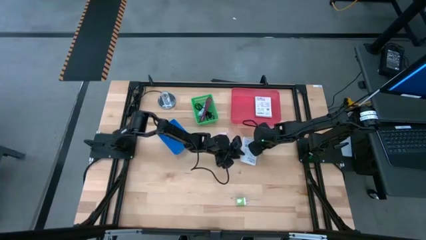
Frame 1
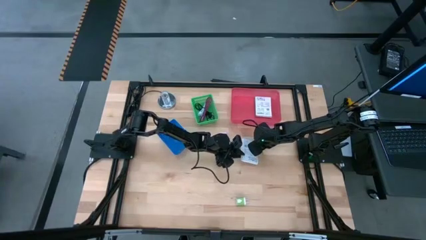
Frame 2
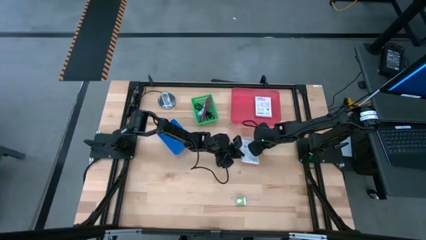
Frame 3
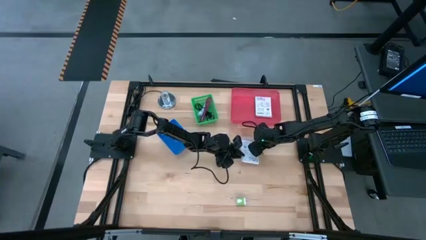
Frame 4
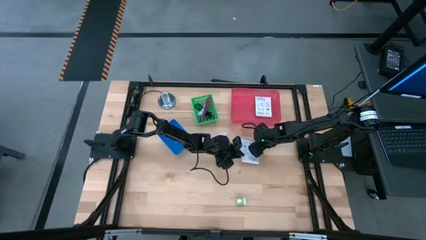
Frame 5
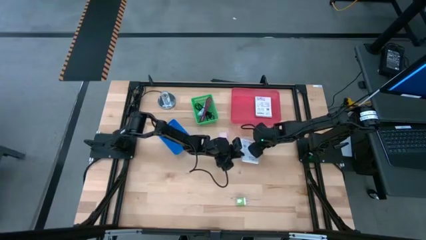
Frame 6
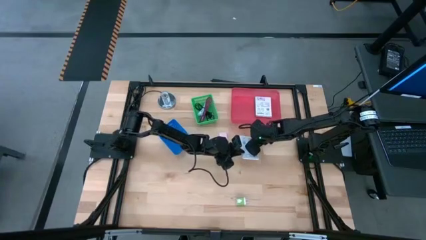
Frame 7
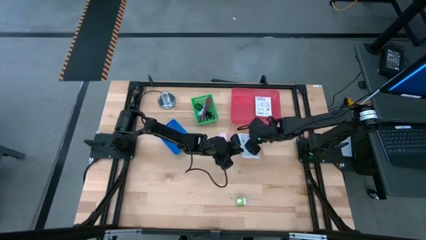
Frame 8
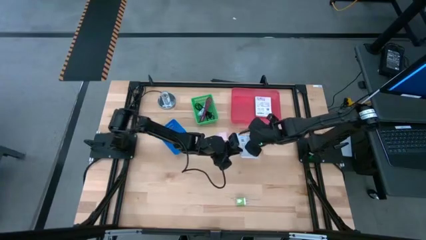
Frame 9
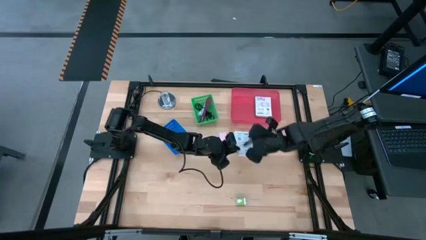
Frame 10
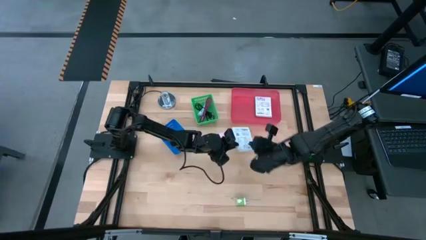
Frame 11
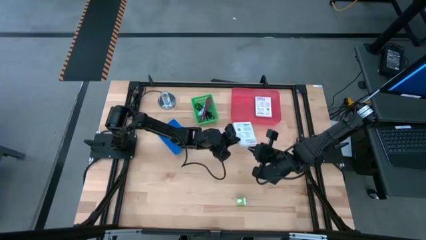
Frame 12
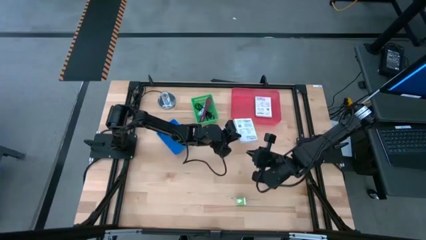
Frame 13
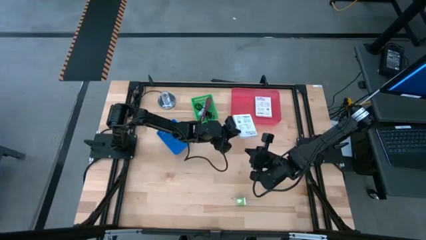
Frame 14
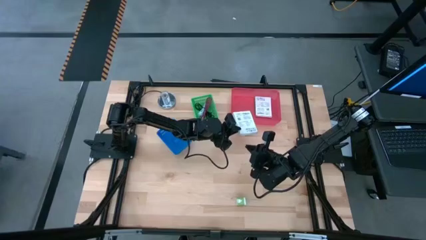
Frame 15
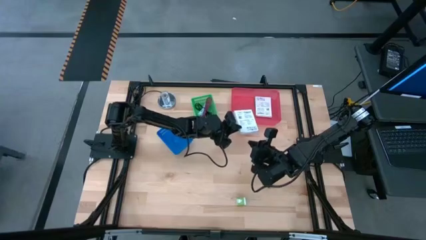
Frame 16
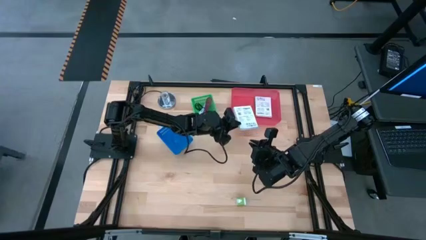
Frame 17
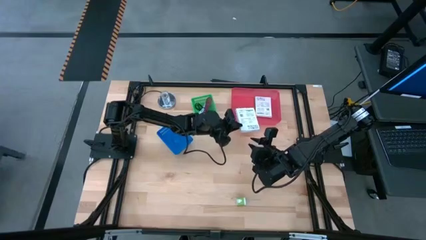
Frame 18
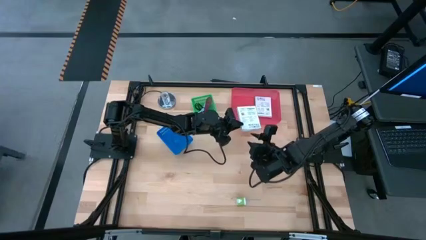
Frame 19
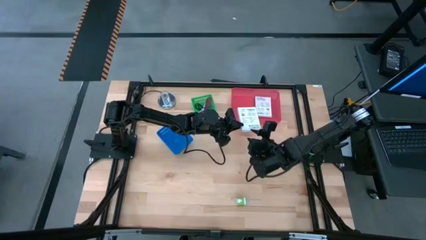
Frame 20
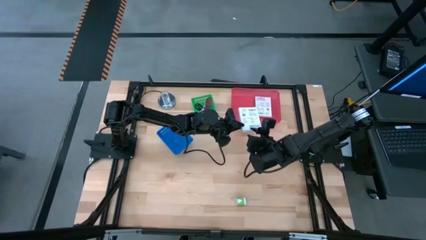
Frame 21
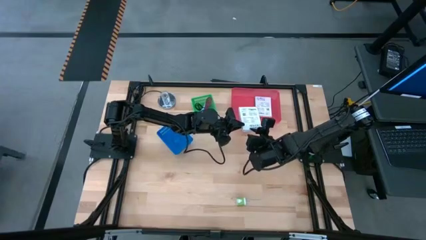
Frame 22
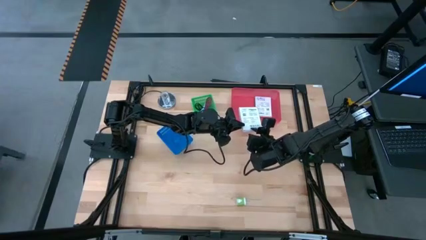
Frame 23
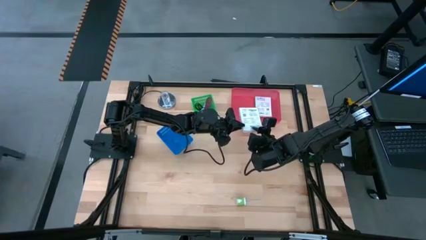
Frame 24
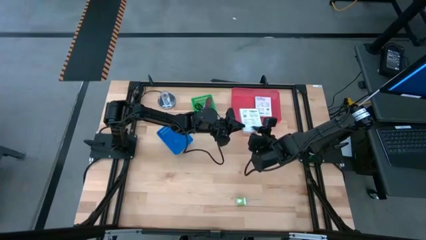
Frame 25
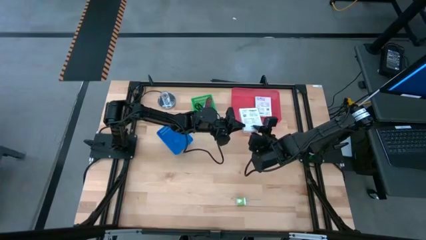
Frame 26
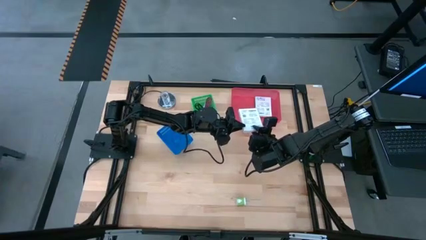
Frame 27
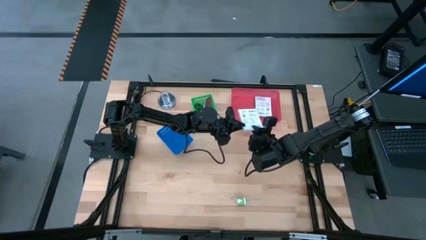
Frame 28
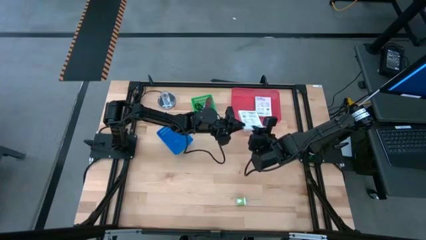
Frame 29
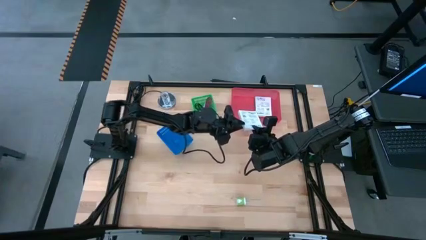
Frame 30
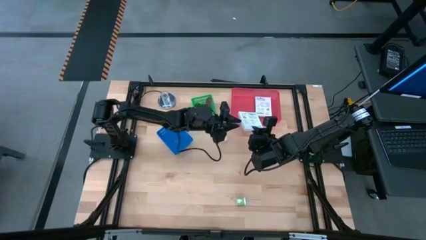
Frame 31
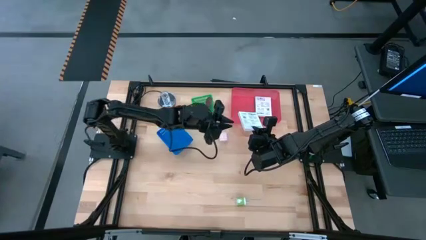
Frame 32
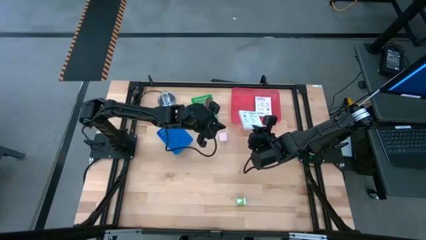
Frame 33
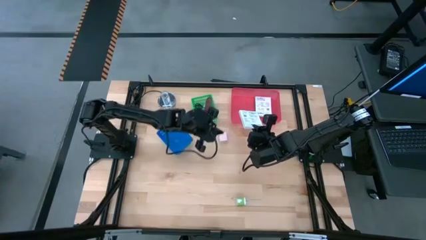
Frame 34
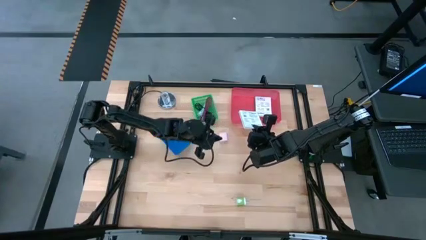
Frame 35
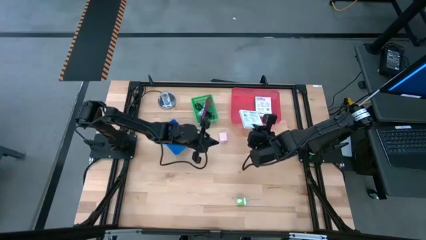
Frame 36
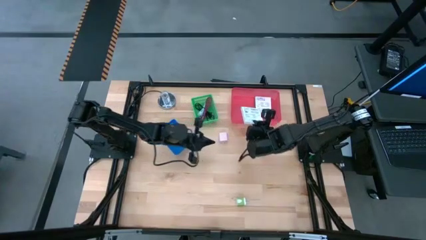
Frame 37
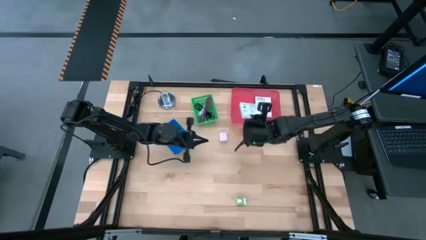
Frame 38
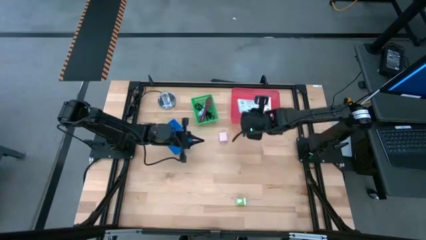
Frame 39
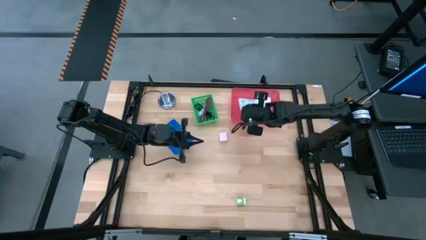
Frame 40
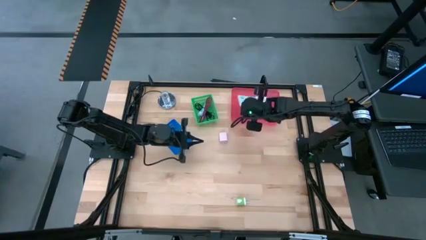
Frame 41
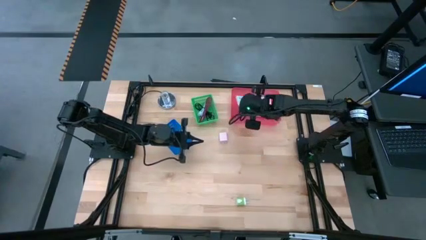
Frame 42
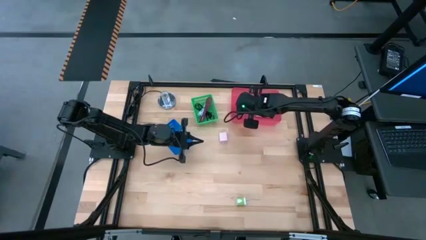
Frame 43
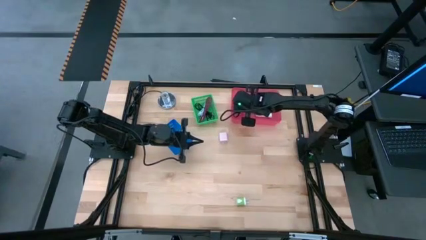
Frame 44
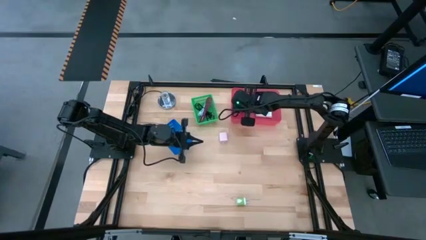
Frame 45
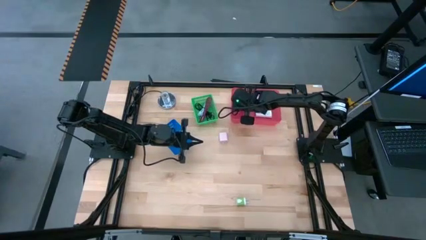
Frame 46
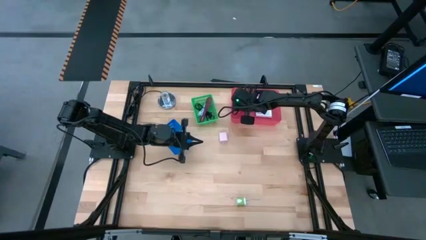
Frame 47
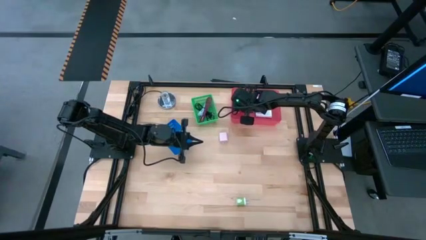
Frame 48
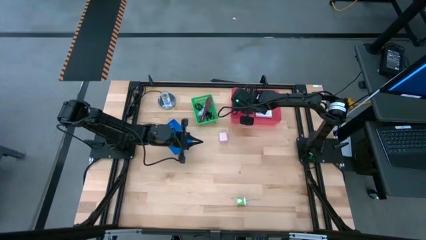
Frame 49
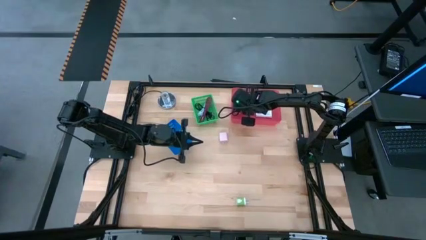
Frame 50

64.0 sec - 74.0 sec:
Task: Pick and place items into bin
Put the white card reader box into the pink bin

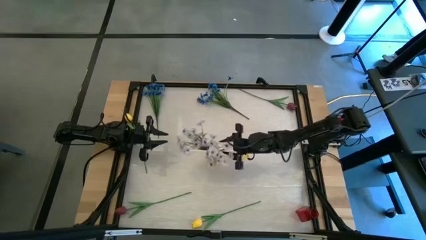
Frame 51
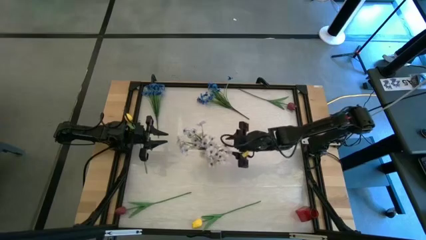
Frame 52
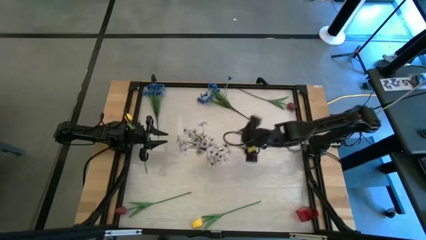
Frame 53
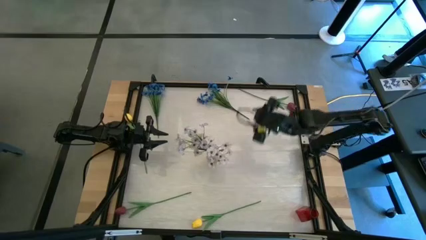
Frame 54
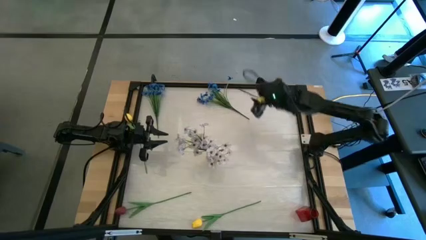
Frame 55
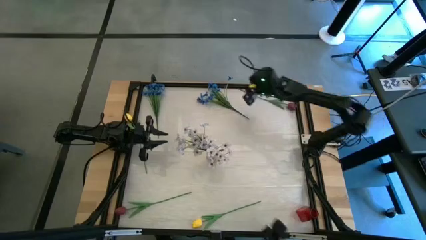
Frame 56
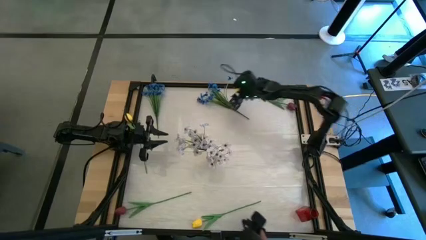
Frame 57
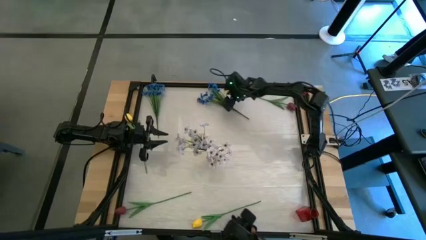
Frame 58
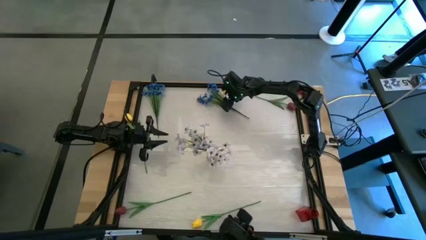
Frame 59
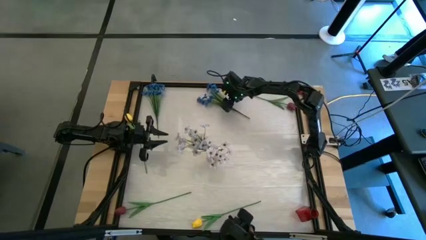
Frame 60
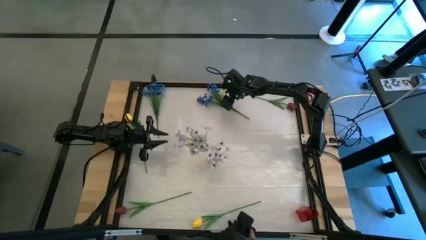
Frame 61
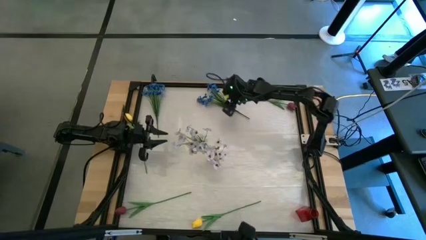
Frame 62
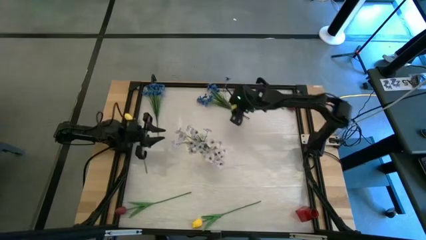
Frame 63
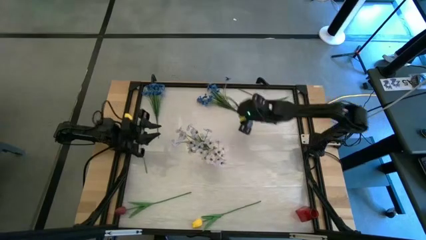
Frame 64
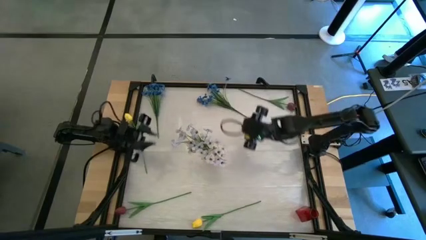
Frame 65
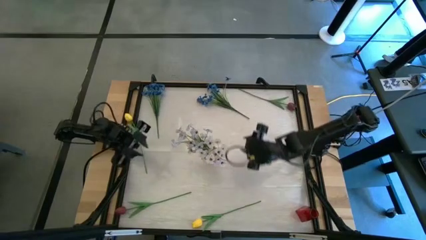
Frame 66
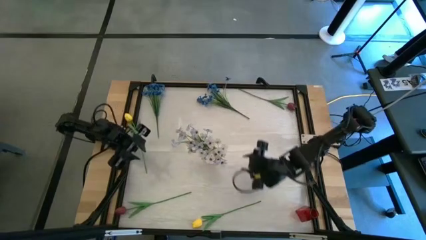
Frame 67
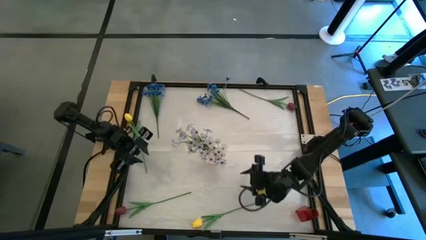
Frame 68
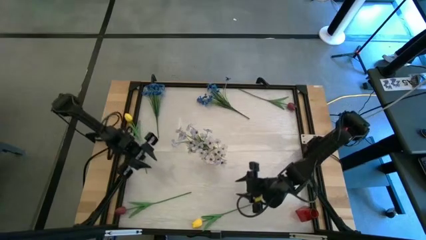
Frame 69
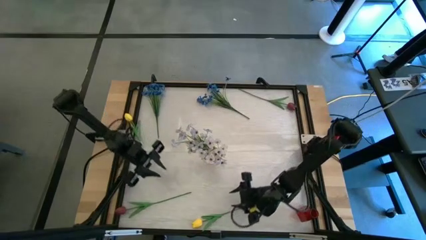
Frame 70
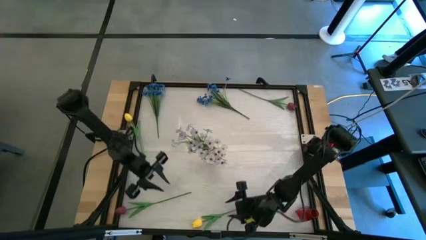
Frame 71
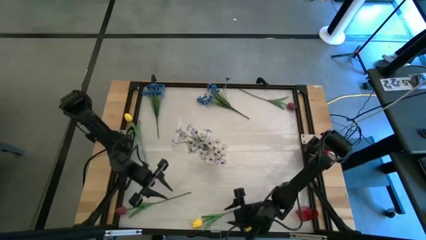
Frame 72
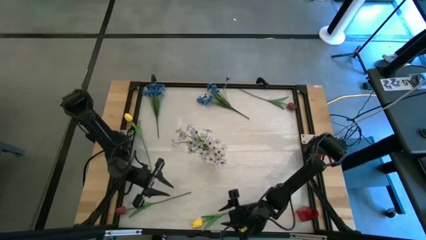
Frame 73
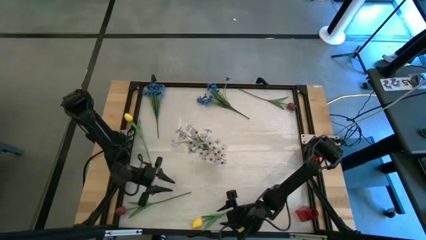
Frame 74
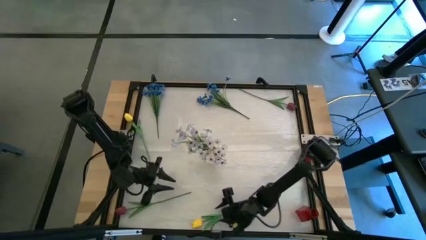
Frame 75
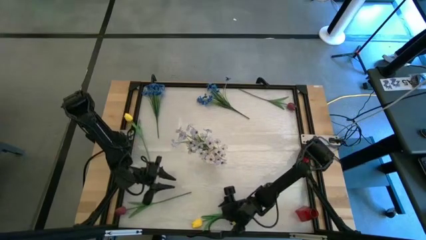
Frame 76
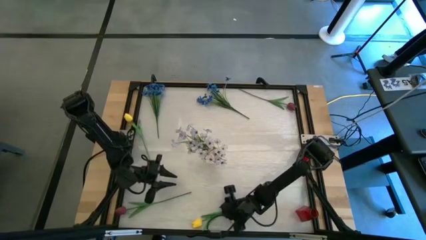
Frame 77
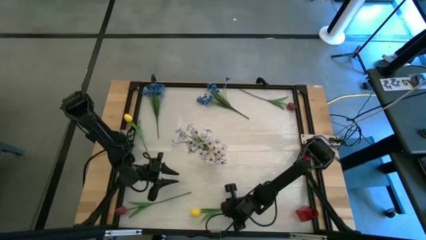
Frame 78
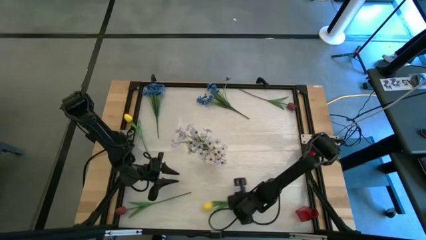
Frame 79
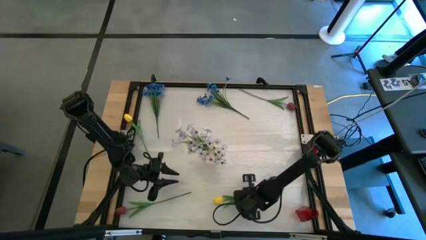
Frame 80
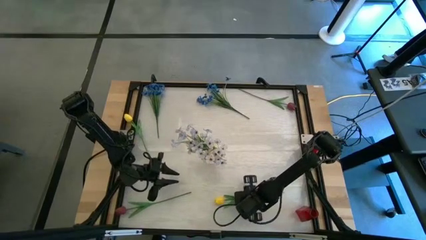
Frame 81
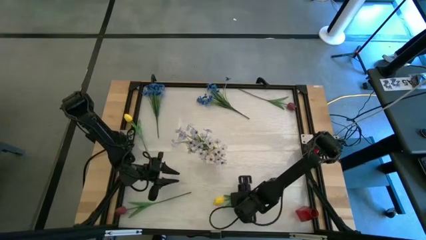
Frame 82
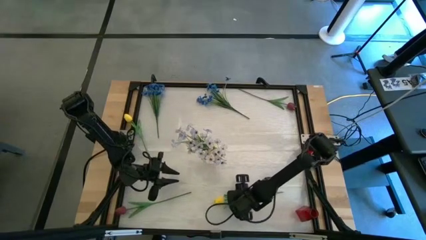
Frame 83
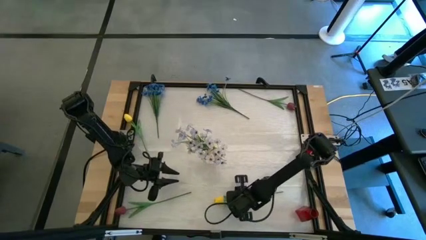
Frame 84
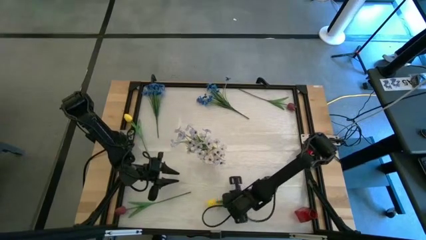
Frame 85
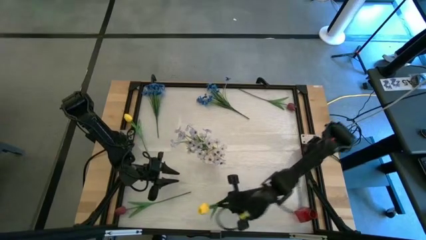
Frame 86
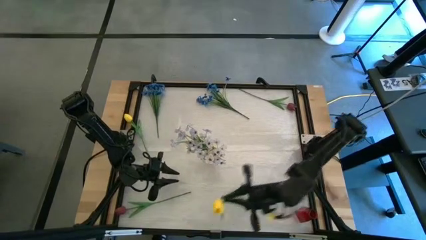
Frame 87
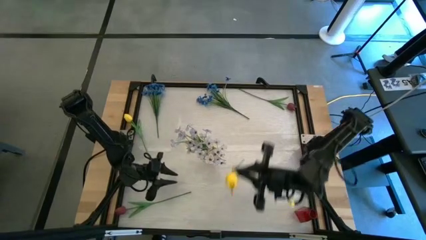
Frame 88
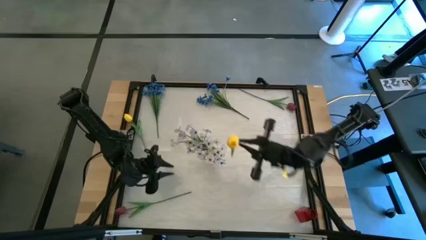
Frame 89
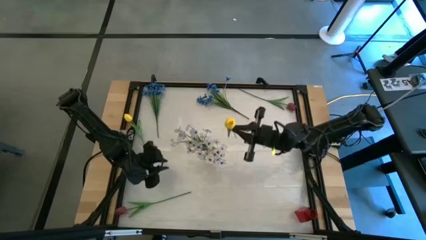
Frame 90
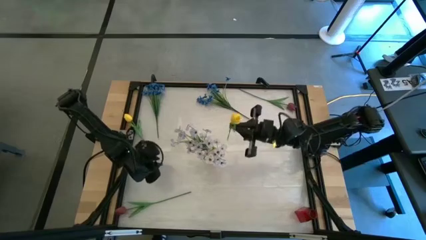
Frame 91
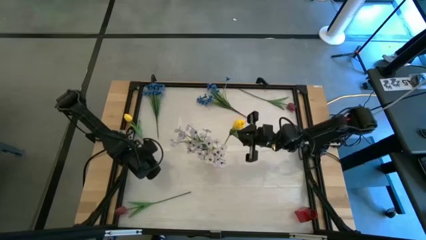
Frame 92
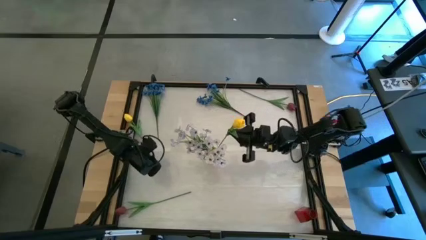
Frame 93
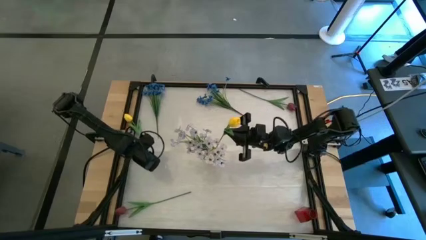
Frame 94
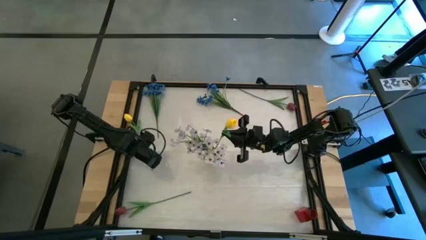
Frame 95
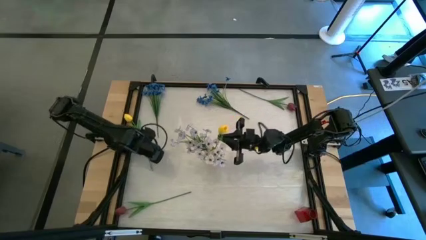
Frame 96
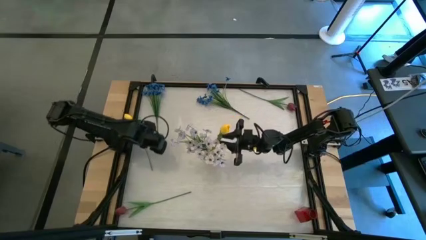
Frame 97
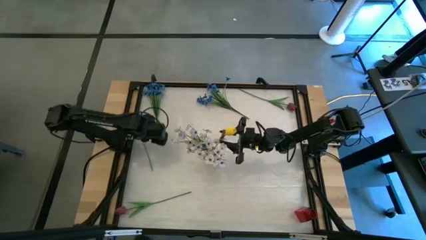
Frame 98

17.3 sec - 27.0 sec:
Task: Sort flowers into vase by color
Put the bottom yellow flower into the yellow vase
